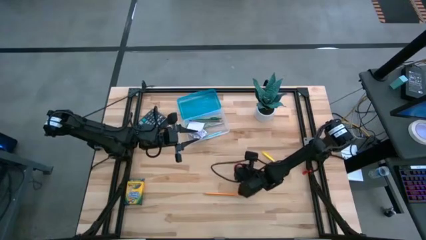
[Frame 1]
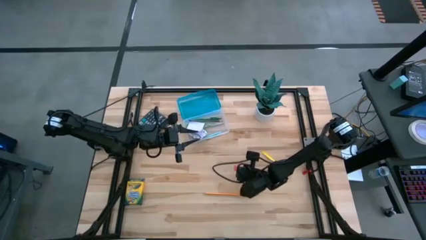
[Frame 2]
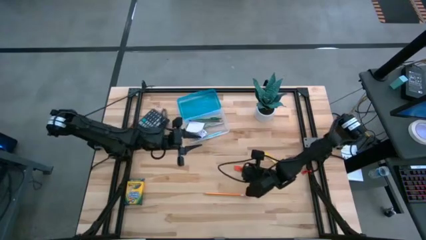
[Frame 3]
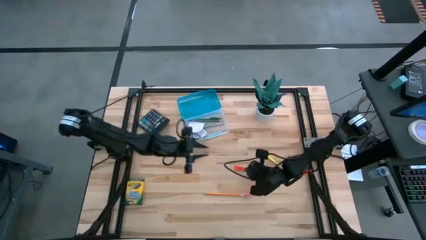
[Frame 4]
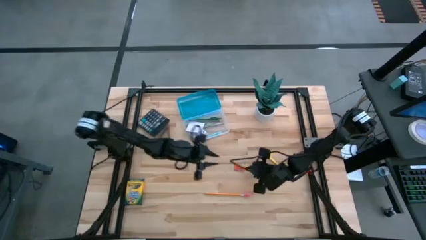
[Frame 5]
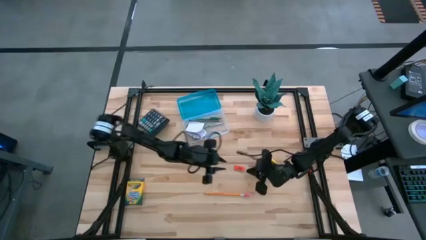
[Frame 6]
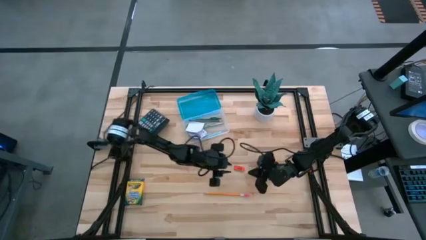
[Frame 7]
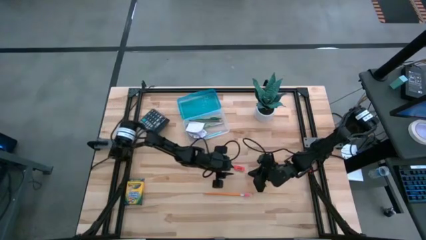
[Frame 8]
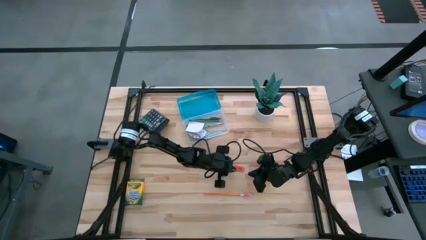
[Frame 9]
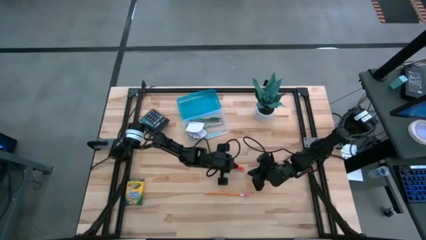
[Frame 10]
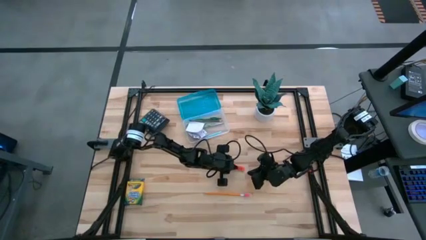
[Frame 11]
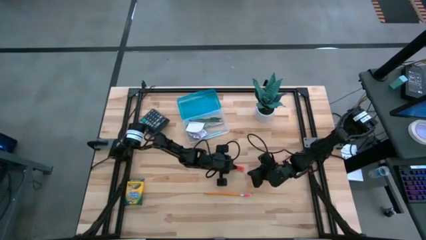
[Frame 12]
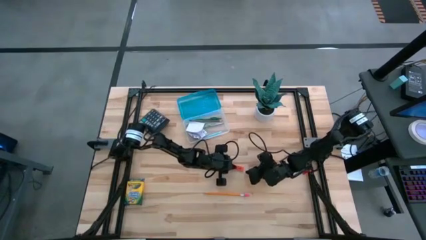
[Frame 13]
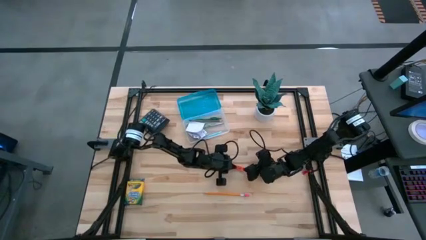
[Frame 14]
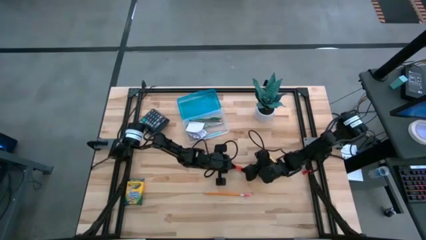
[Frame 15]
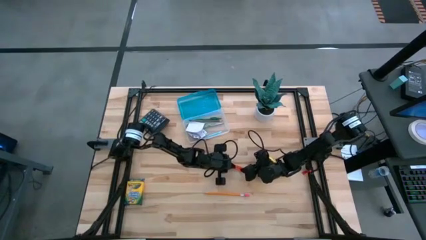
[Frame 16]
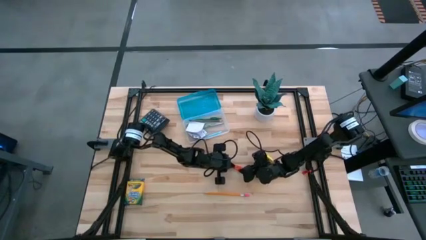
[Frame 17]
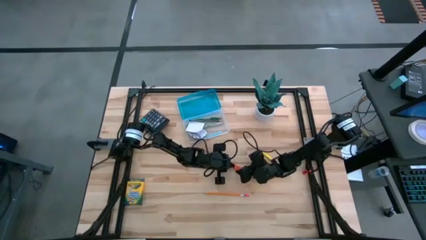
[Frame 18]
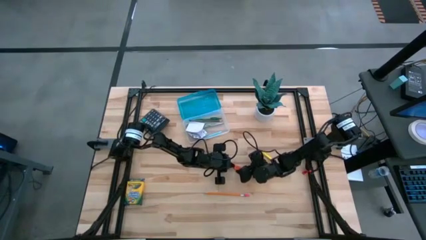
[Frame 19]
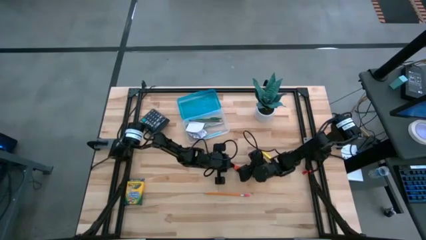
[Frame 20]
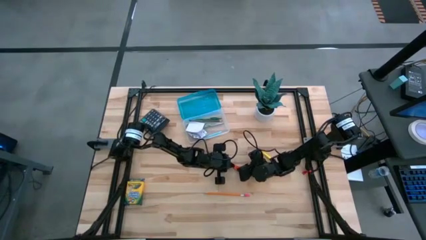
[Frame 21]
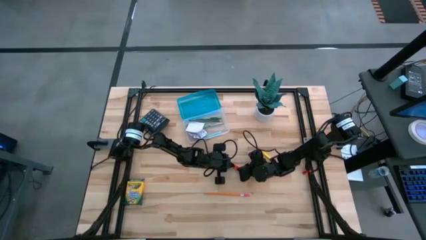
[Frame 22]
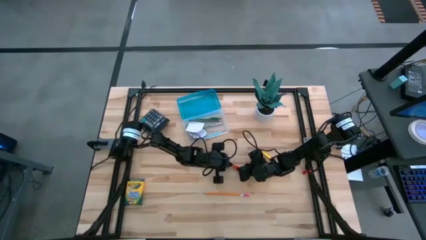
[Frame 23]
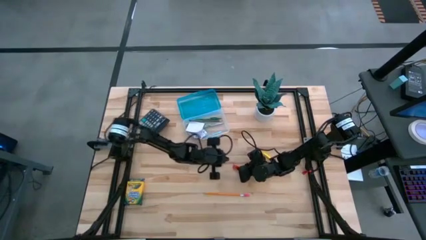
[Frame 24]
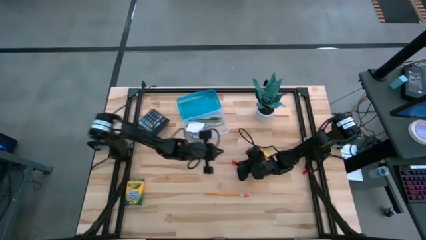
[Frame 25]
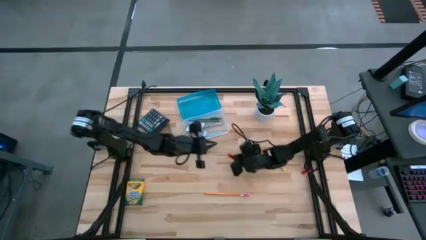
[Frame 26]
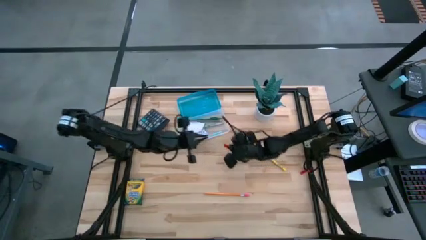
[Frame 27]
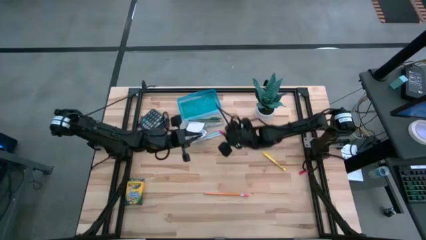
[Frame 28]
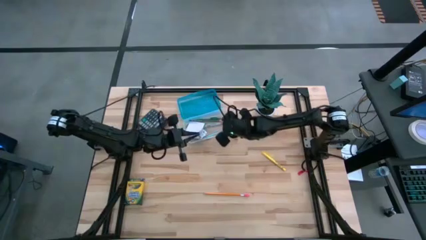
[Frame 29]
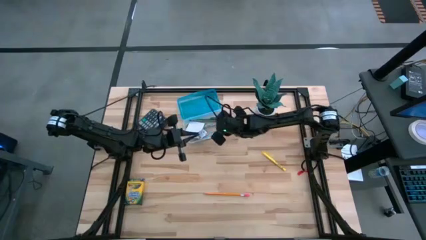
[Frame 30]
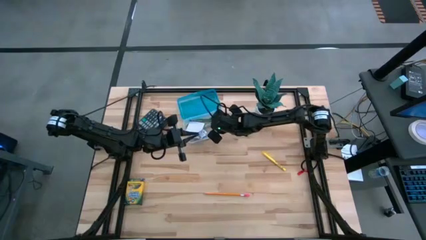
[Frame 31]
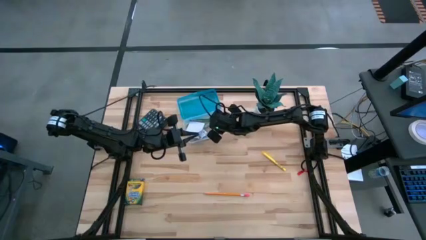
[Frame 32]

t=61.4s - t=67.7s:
Task: Pack school essentials
Put the orange eraser into the blue supply box

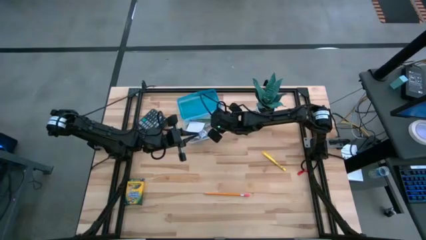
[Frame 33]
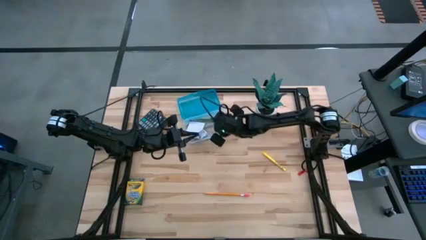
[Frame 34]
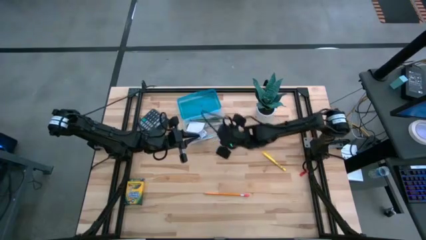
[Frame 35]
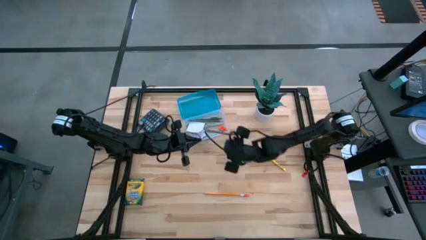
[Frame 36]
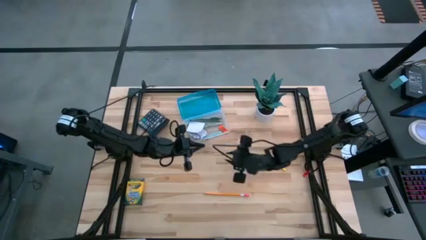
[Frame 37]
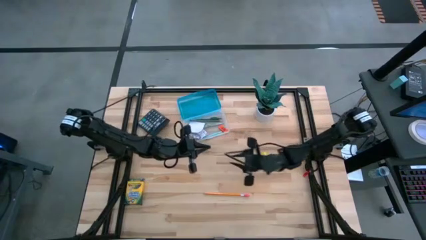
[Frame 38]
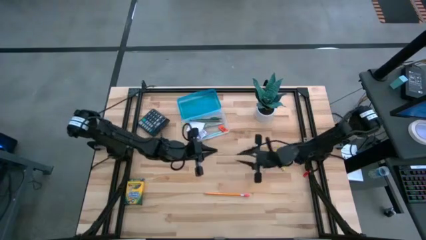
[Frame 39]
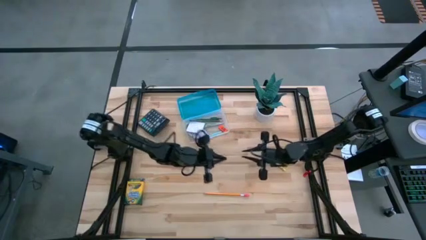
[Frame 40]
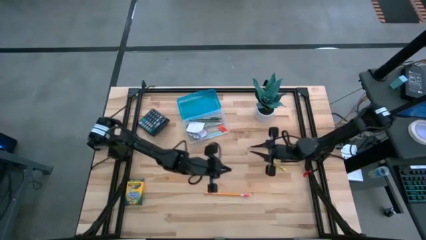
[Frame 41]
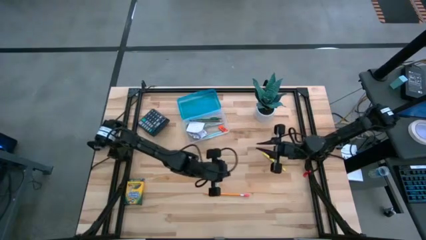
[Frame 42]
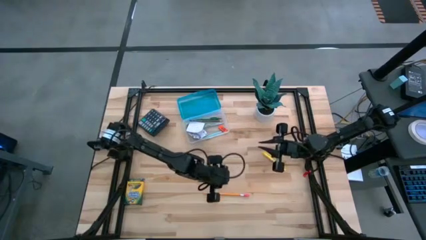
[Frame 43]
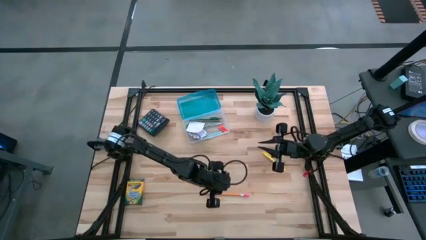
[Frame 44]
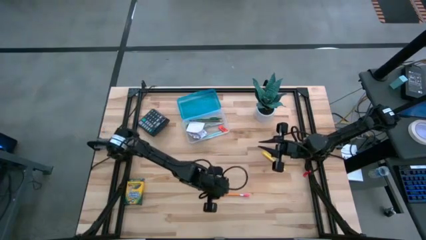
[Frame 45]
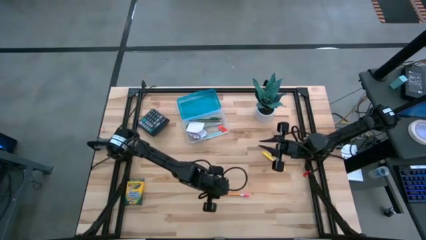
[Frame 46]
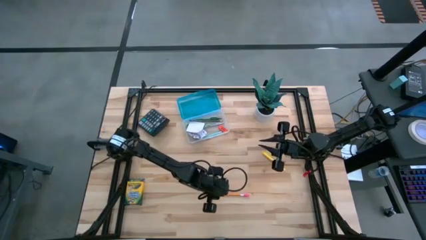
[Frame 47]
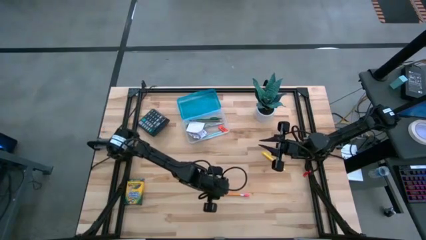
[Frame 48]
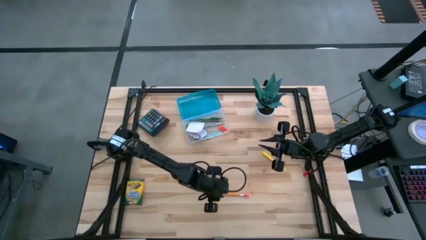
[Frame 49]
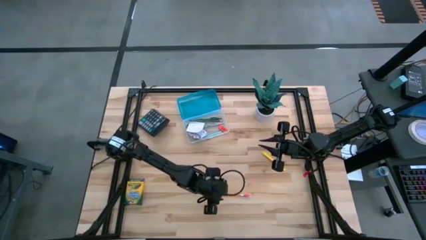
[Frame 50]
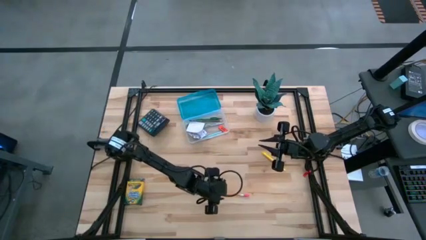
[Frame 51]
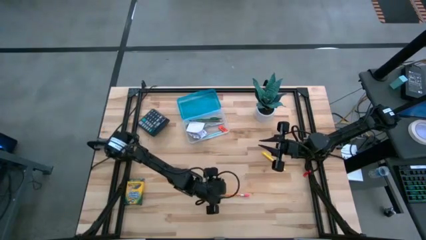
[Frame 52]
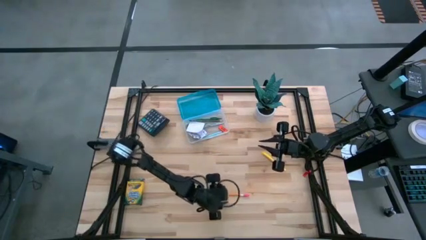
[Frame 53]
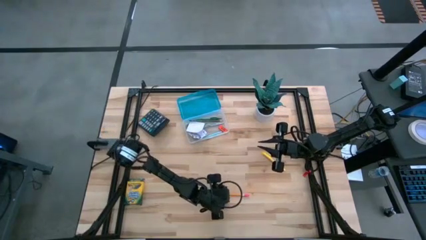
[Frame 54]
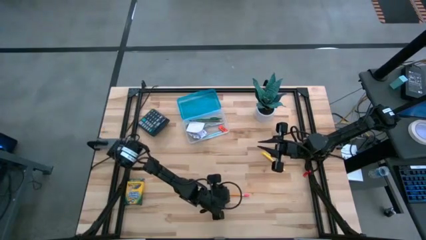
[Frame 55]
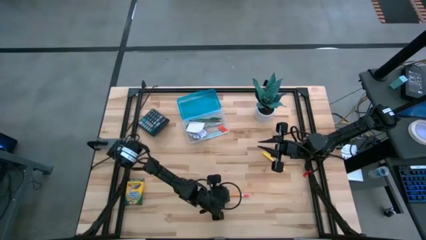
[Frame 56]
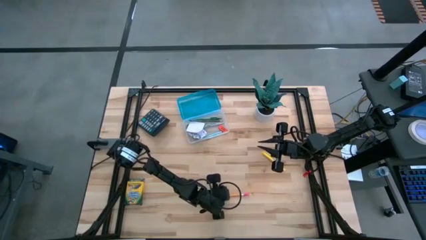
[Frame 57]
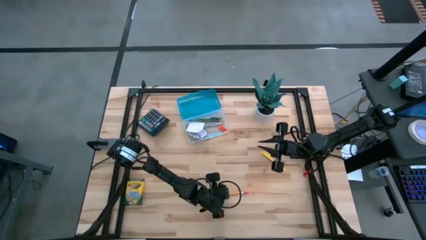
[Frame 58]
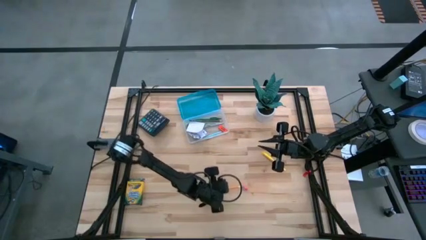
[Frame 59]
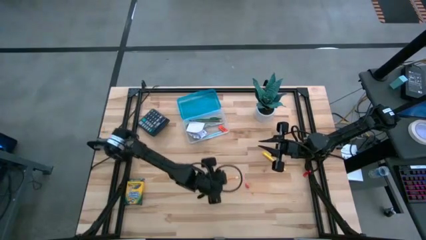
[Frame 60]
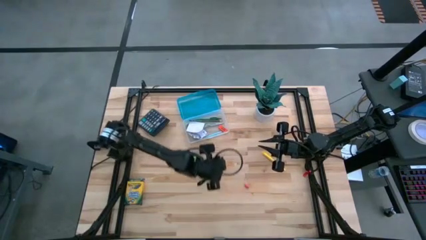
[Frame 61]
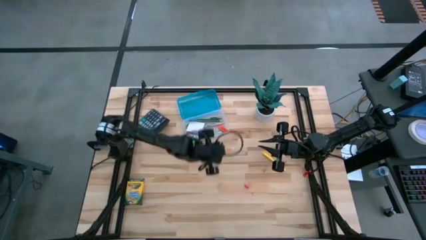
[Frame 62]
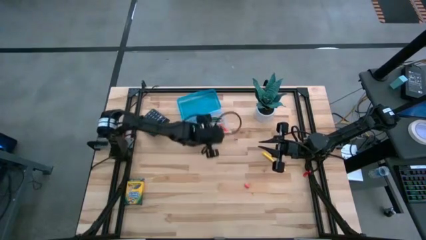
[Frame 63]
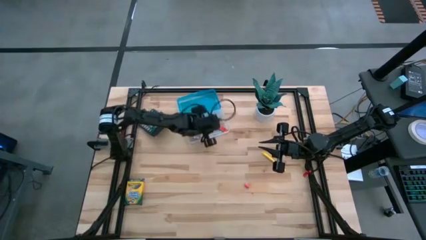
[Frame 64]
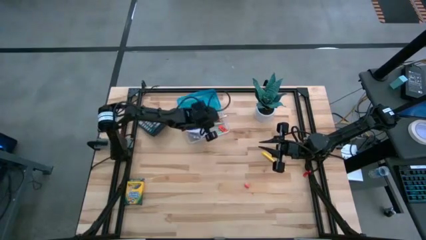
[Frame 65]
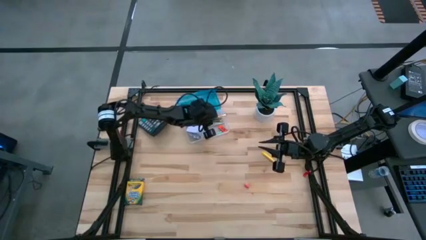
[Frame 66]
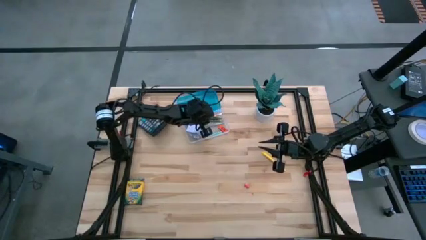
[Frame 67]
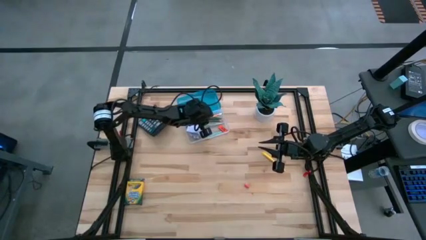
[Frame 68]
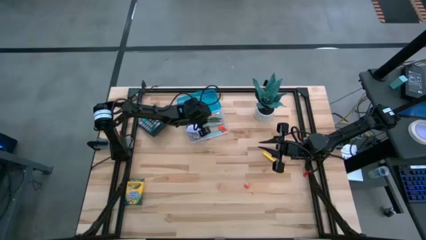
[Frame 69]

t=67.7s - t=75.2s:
Put the orange pencil into the blue supply box

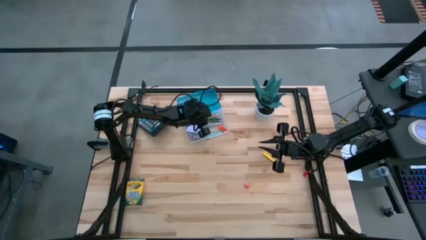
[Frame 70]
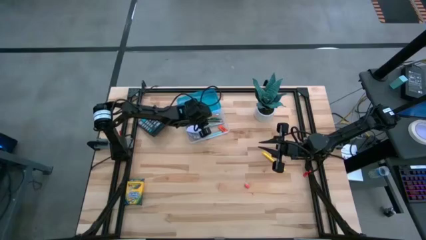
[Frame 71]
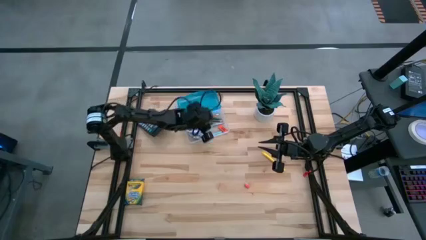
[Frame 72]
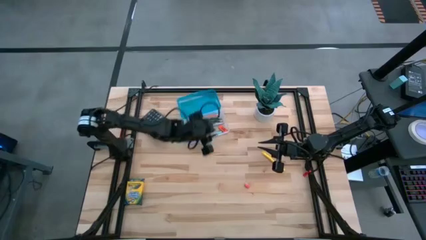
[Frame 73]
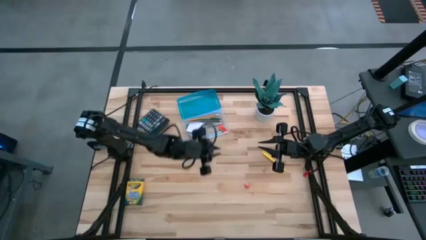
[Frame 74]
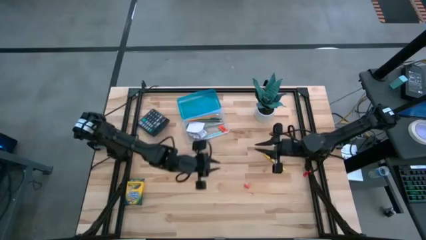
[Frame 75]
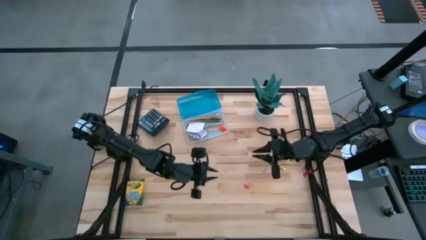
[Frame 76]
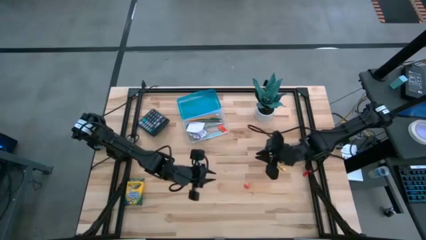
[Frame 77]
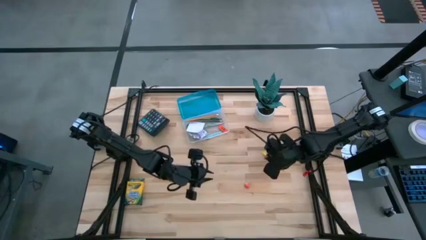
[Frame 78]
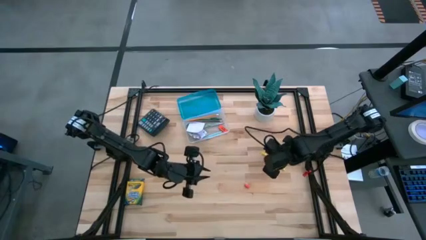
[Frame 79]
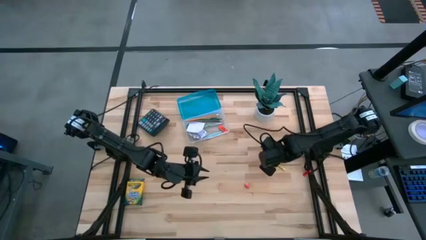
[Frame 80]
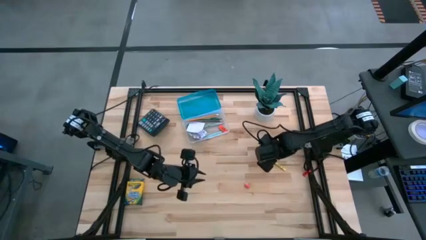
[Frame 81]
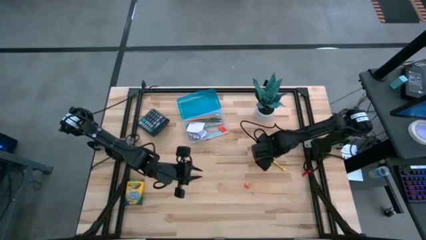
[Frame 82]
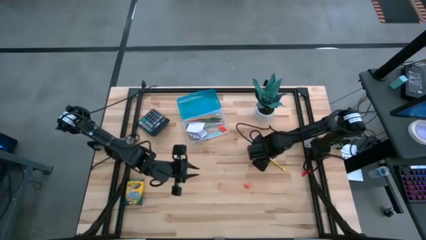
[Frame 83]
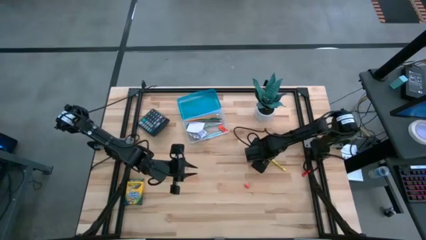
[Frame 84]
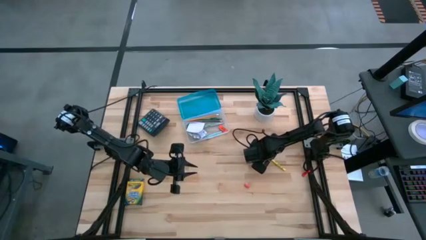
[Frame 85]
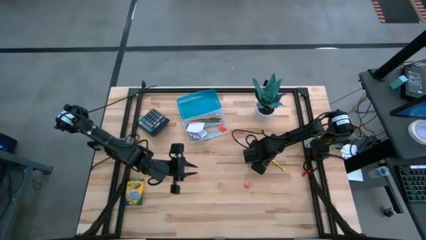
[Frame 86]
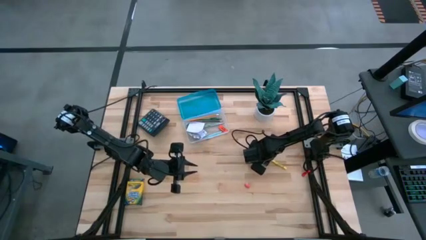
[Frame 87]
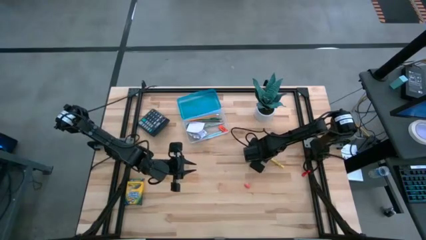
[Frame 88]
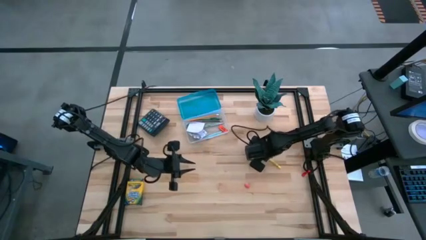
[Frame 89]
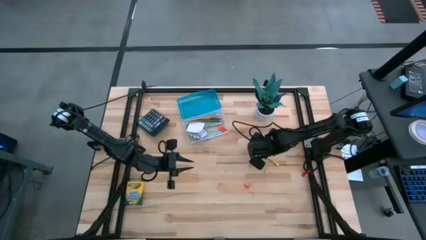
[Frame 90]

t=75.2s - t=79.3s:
Put the yellow pen into the blue supply box
